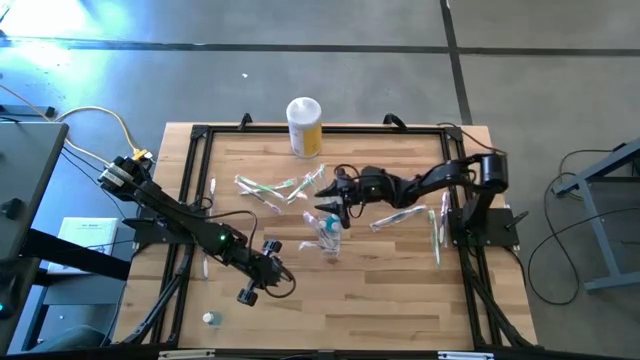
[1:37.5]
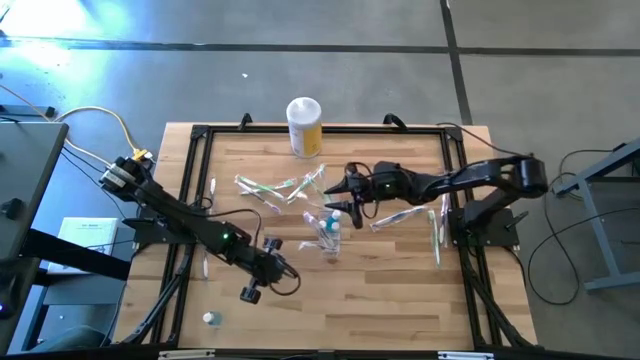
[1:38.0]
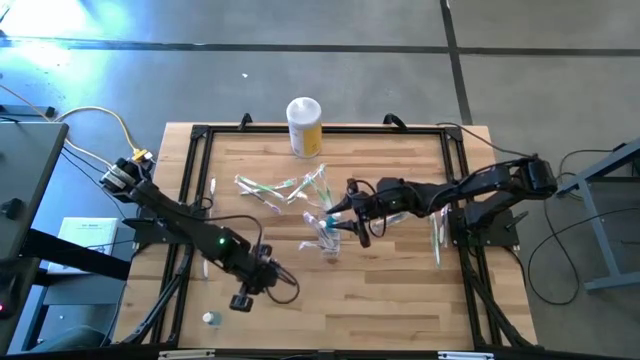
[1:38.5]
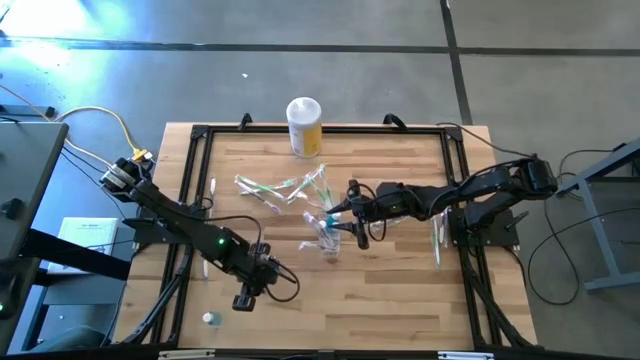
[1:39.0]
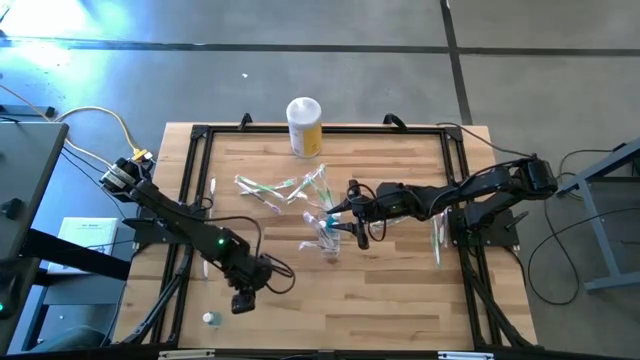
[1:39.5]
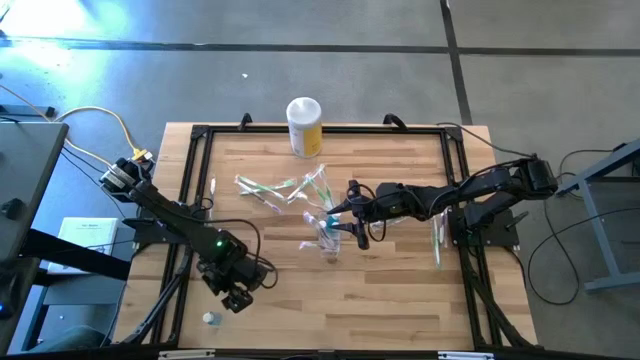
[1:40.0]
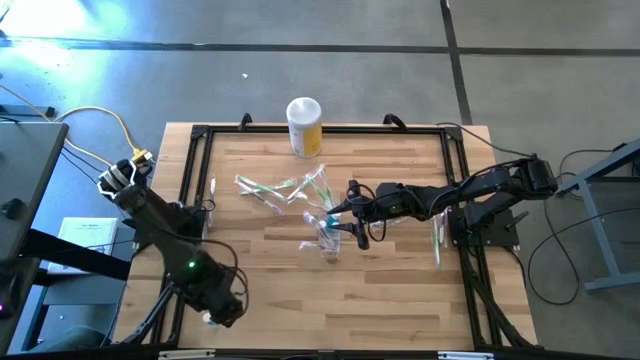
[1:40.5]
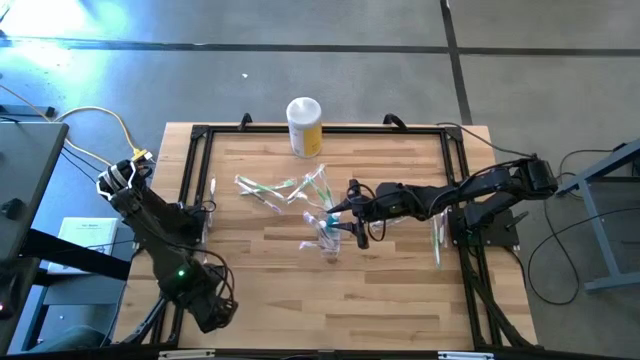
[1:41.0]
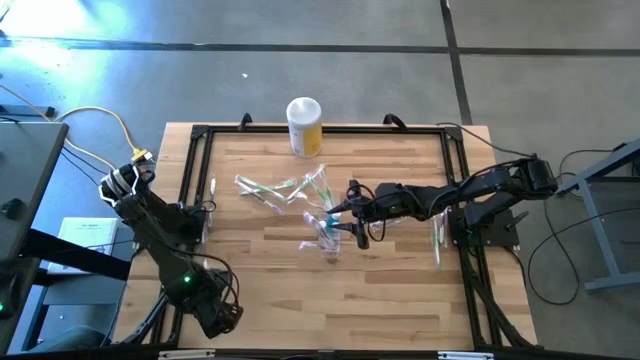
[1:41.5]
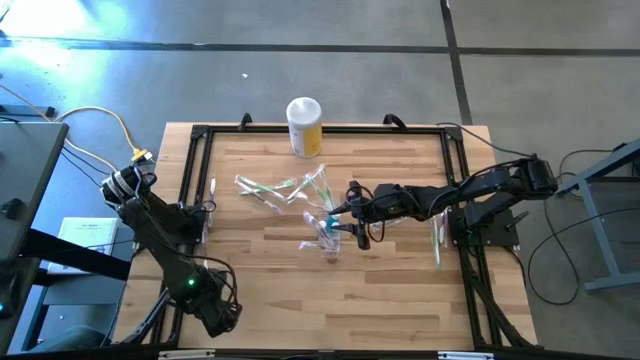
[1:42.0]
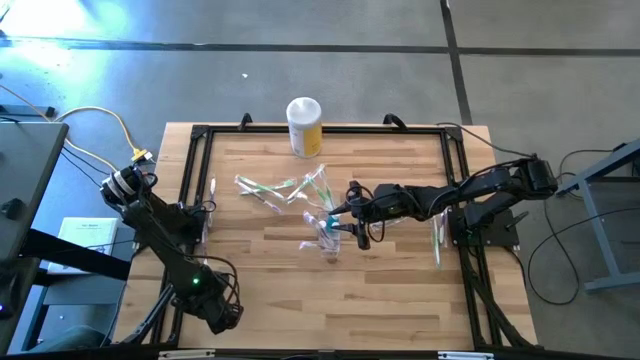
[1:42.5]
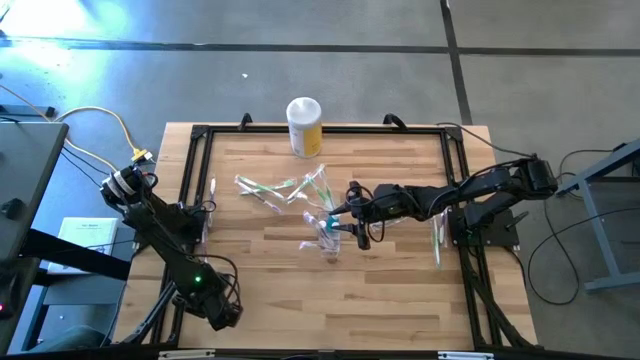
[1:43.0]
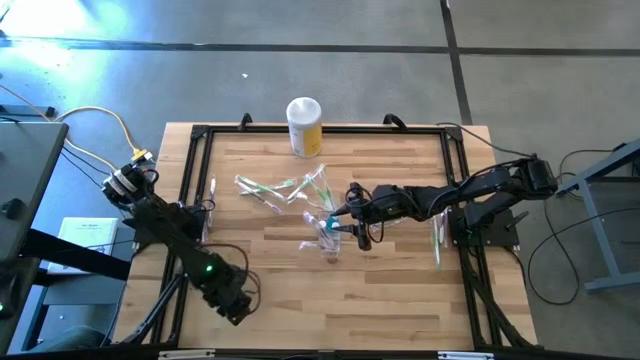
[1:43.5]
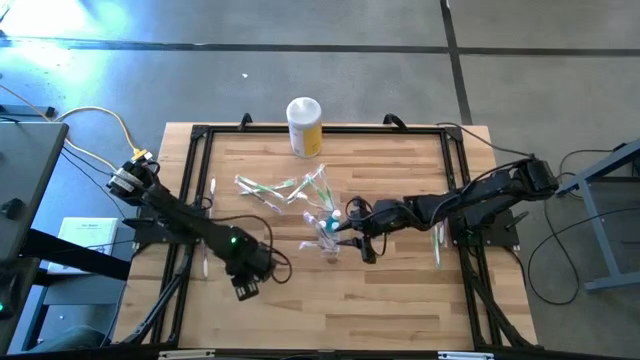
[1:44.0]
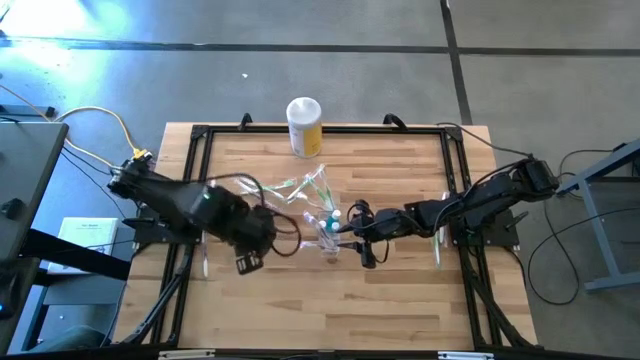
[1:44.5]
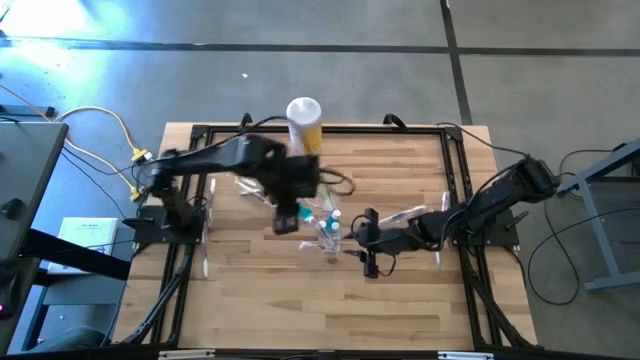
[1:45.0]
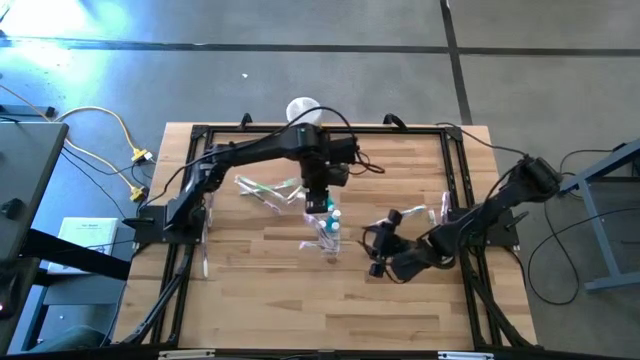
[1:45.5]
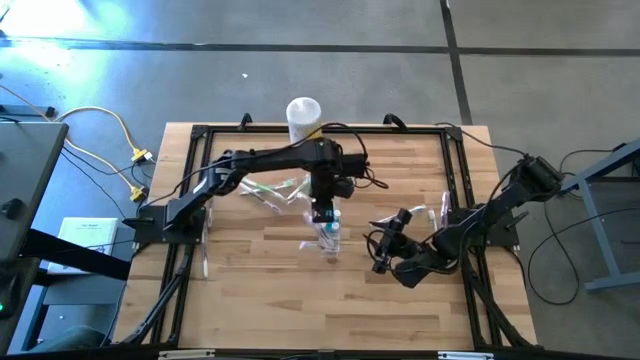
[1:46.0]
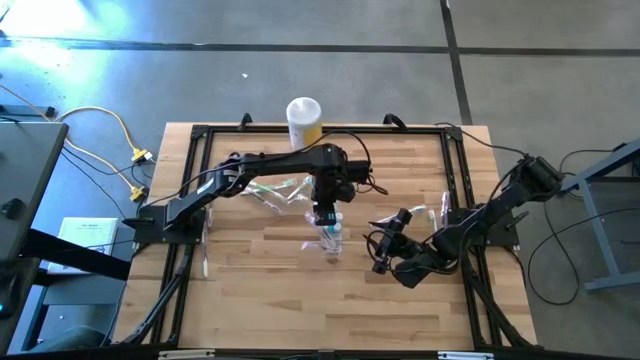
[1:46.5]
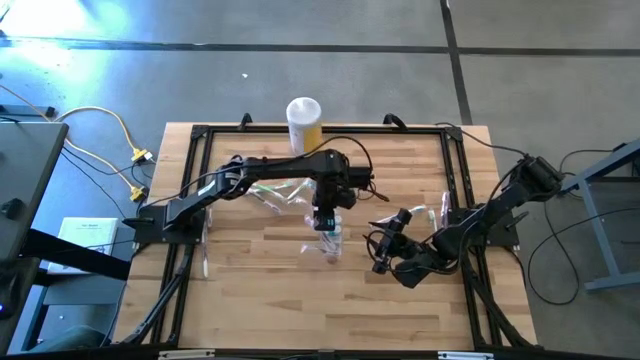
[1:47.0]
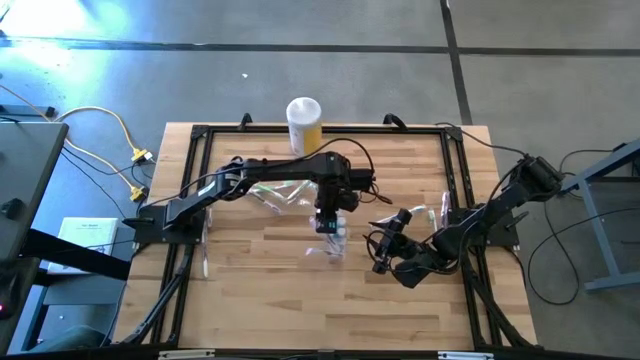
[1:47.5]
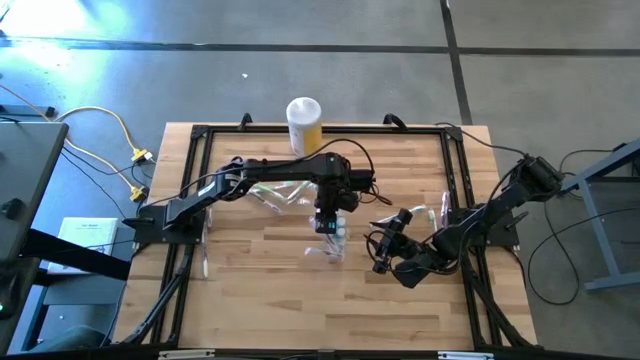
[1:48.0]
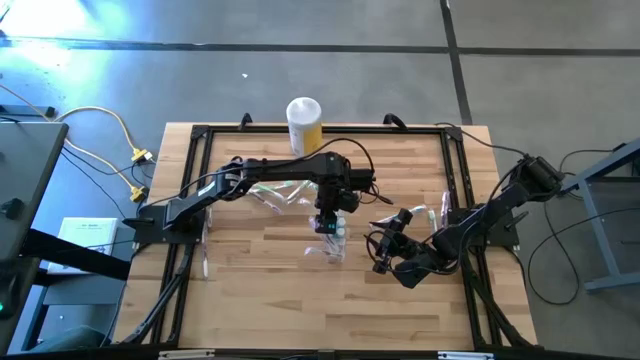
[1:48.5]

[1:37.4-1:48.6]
Task: Pick & Place toothbrushing station
Put the mouthwash bottle into the transparent organizer

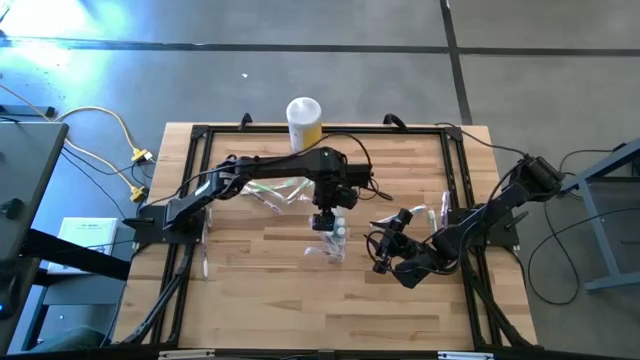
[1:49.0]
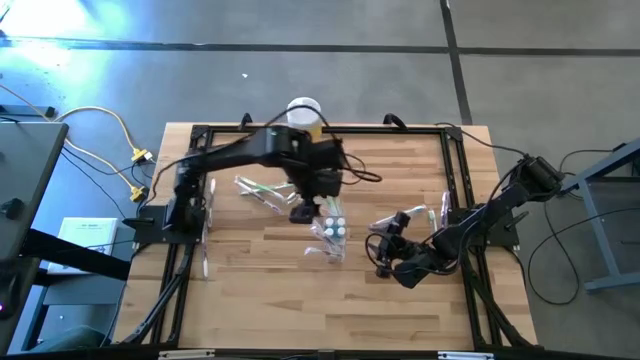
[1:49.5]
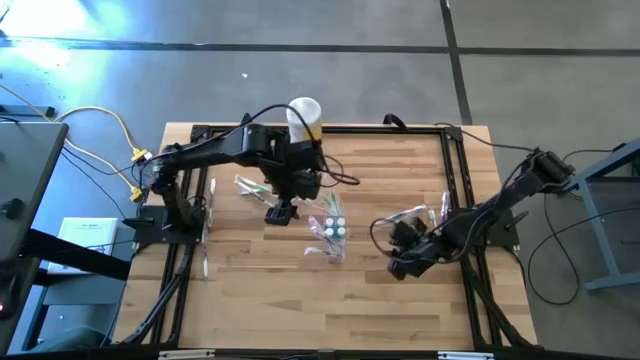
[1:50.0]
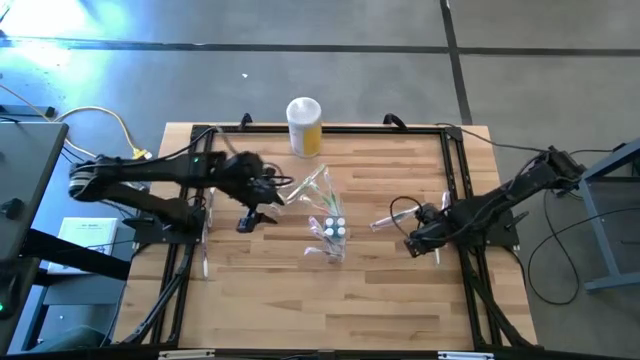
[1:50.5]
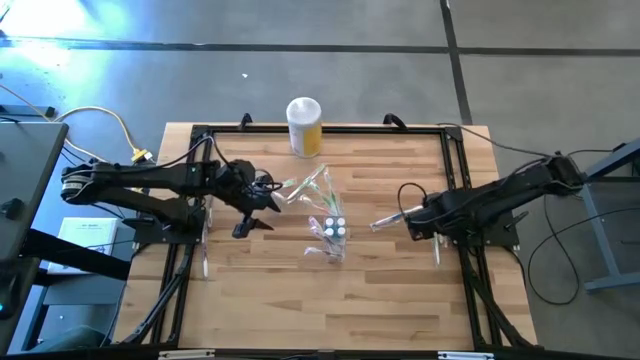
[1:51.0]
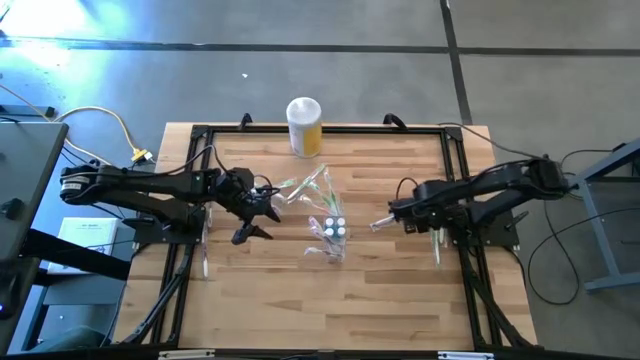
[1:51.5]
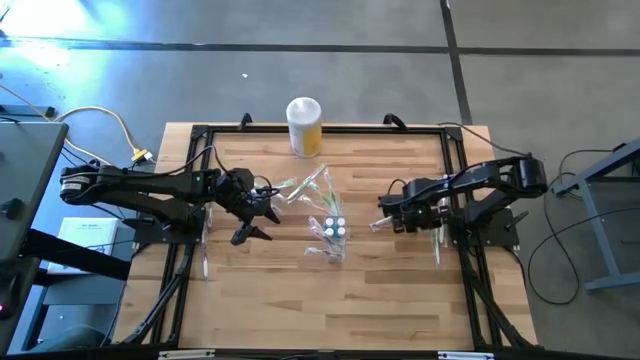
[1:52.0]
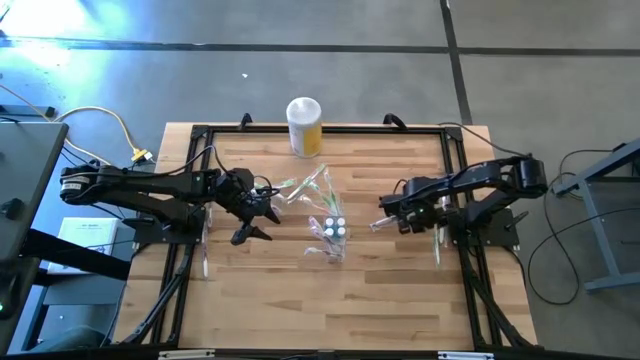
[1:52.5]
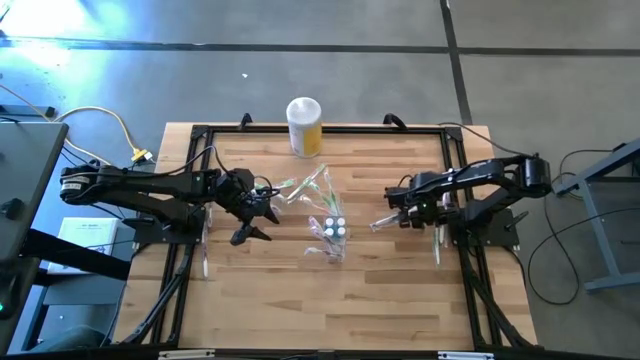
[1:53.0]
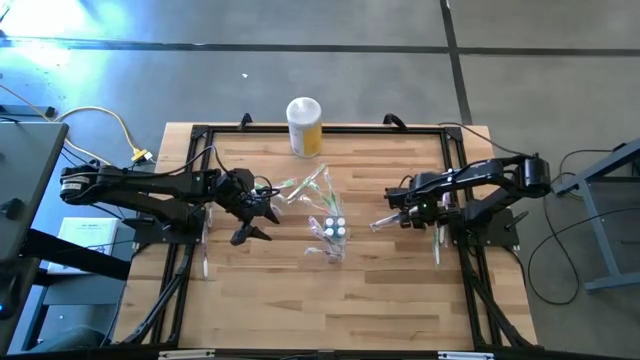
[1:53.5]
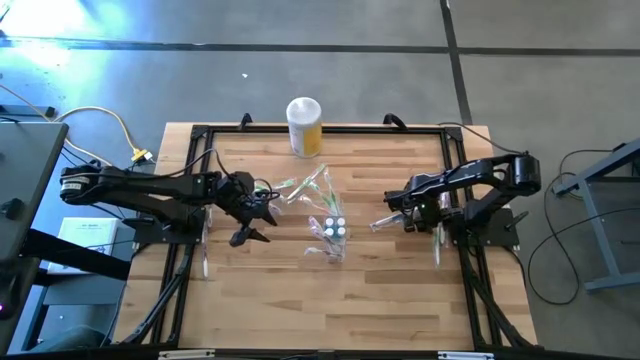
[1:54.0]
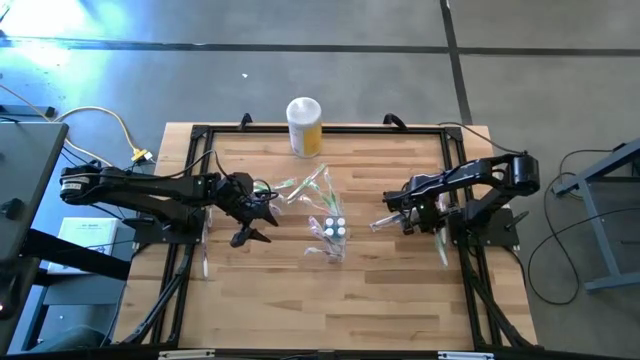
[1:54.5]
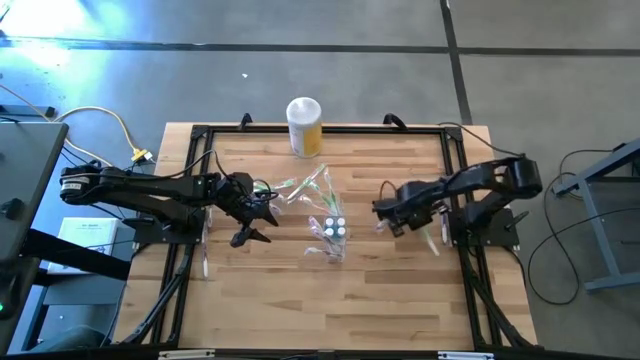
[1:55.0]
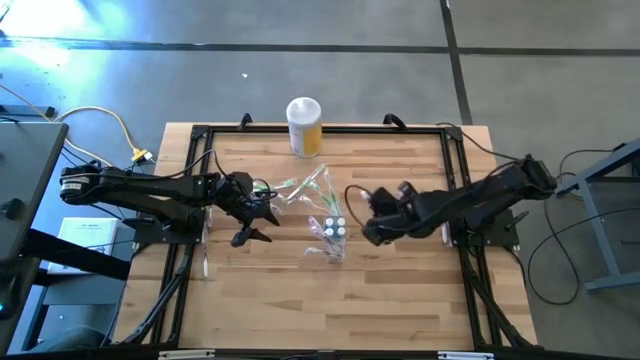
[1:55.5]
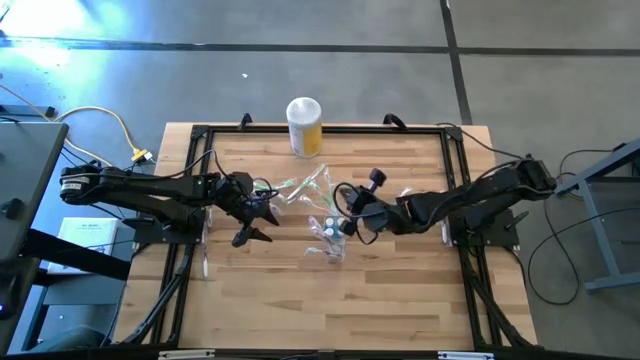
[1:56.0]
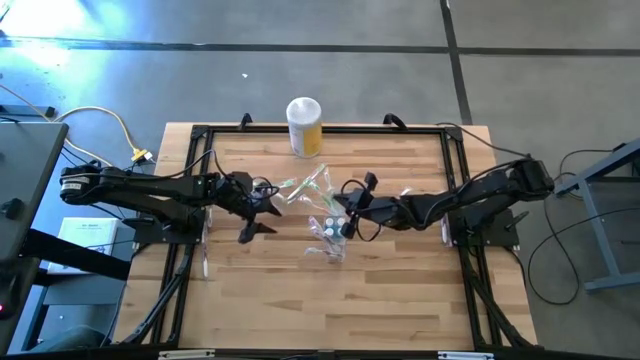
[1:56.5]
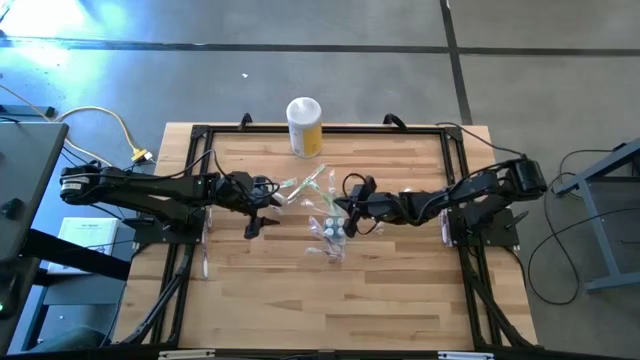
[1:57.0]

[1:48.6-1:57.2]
Put the green toothbrush into the transparent organizer

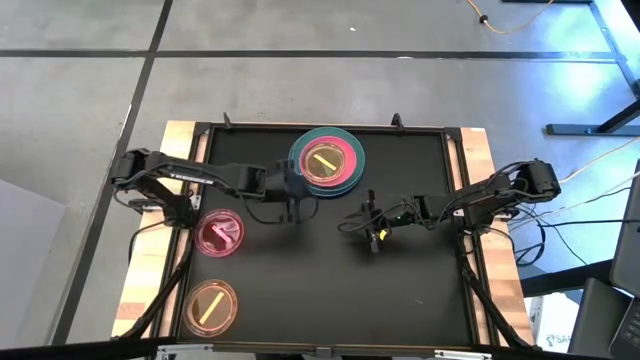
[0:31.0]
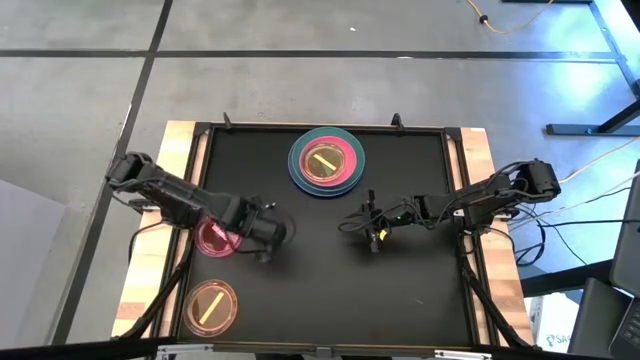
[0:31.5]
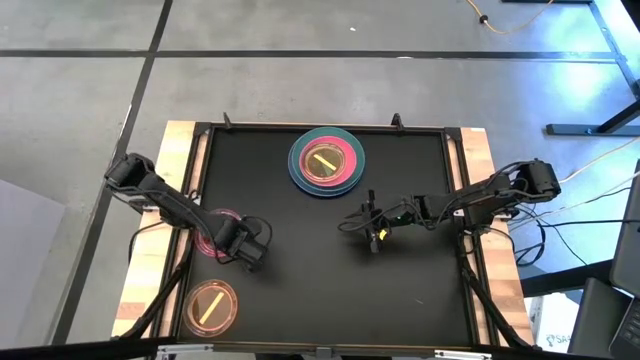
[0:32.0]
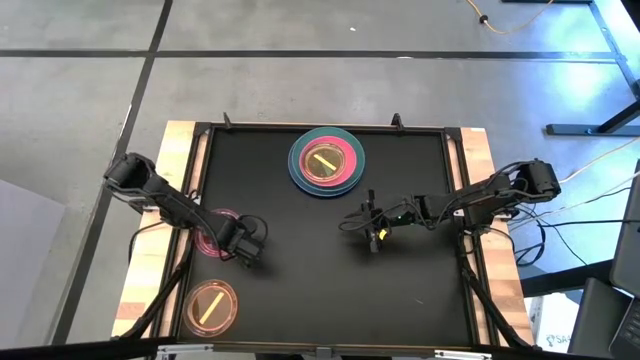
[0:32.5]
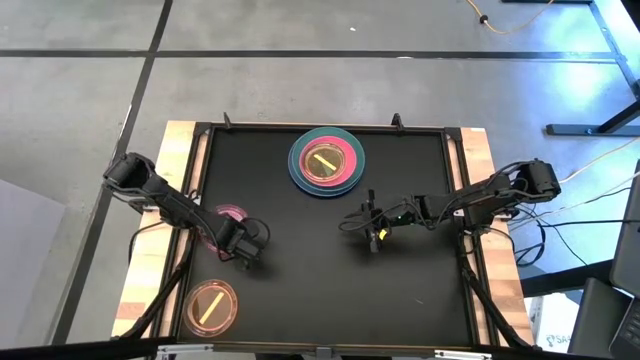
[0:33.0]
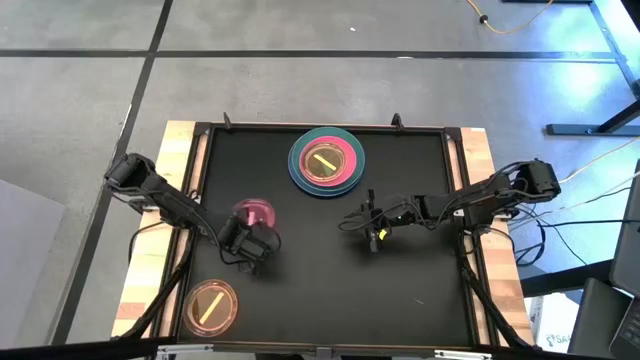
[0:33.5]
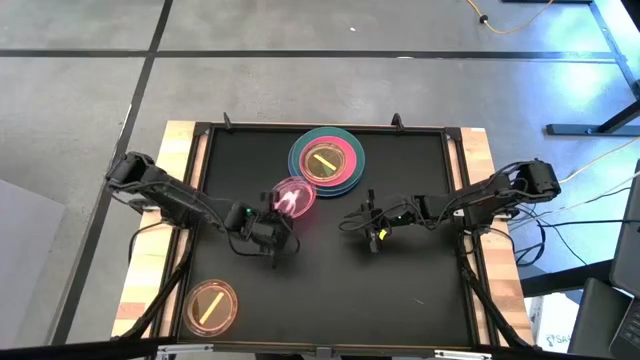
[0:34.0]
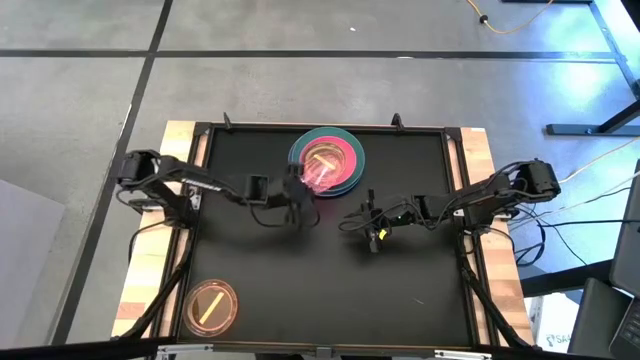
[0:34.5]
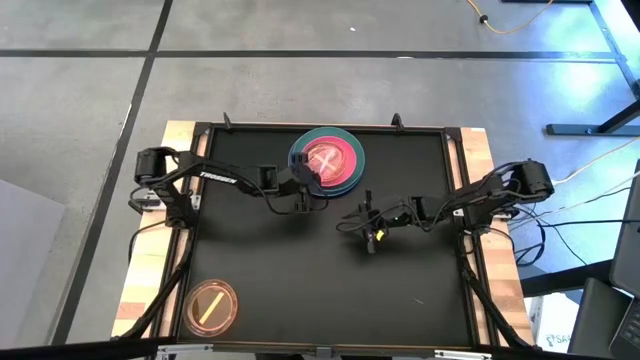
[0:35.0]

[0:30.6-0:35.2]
Task: Stack plastic plates
Stack the light pink plate on top of the stacked orange plate
